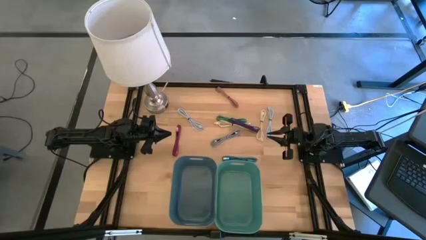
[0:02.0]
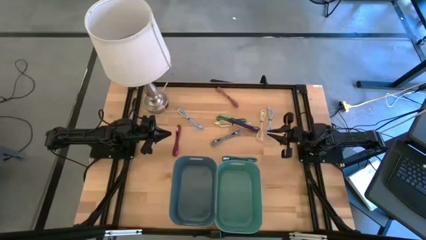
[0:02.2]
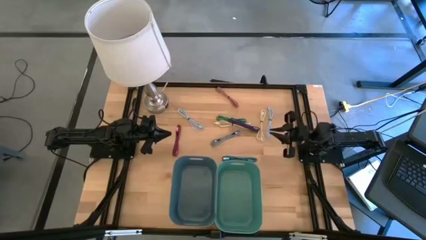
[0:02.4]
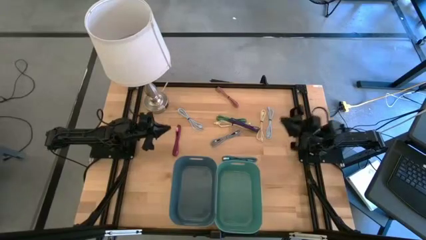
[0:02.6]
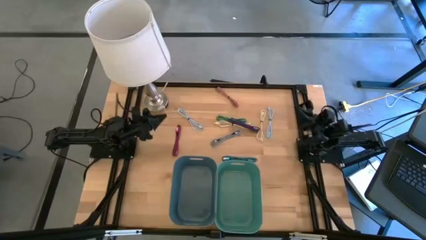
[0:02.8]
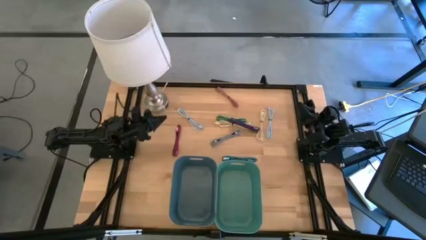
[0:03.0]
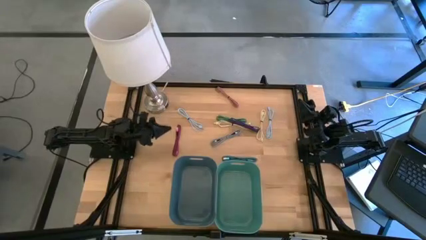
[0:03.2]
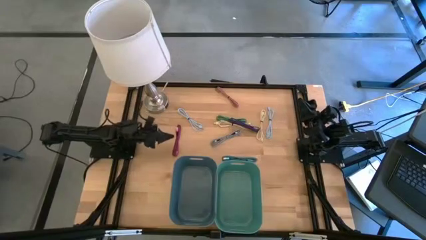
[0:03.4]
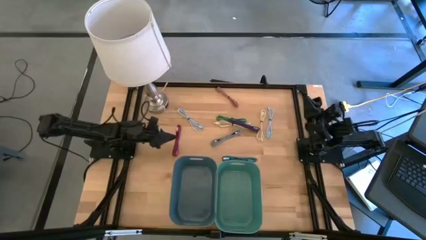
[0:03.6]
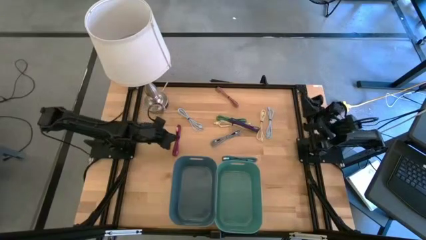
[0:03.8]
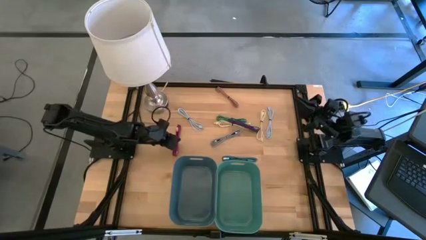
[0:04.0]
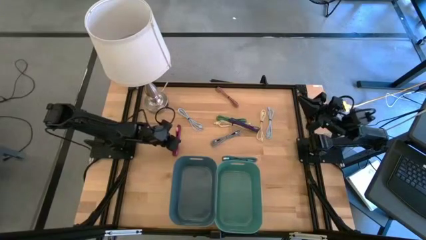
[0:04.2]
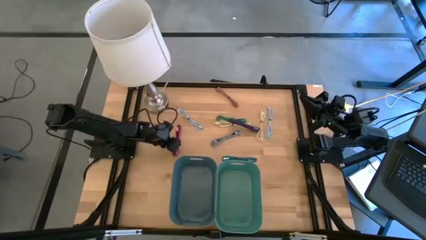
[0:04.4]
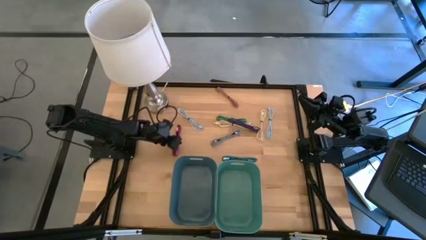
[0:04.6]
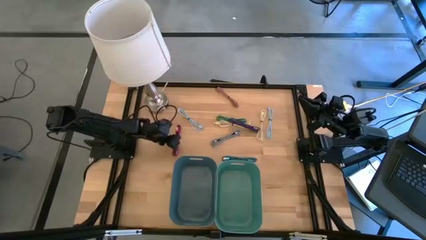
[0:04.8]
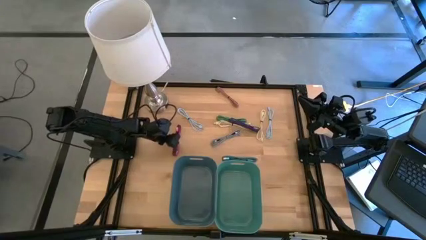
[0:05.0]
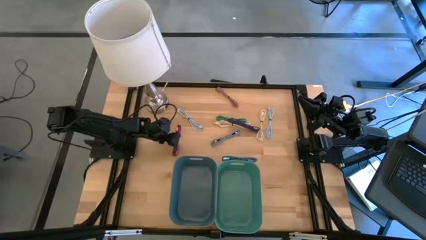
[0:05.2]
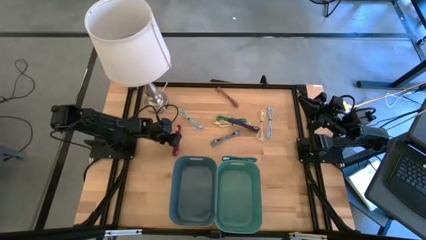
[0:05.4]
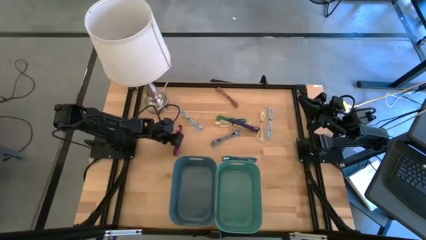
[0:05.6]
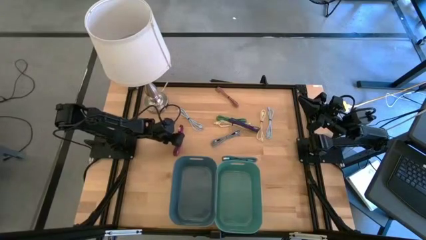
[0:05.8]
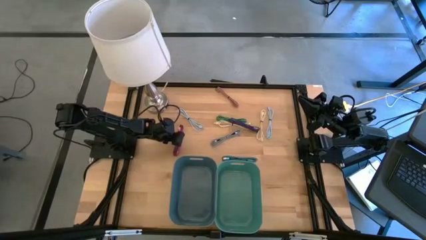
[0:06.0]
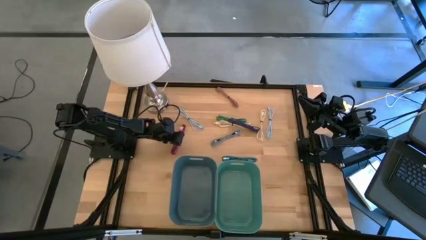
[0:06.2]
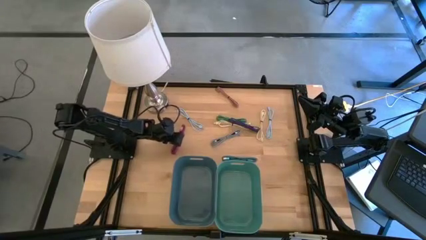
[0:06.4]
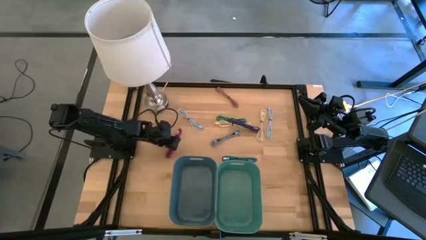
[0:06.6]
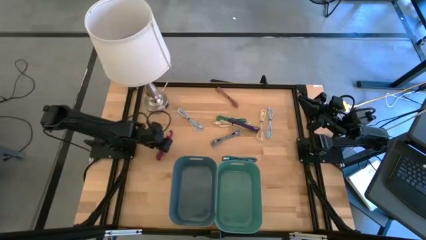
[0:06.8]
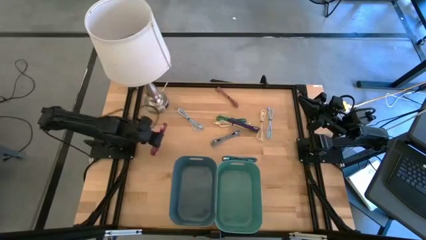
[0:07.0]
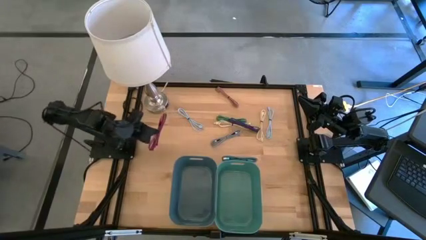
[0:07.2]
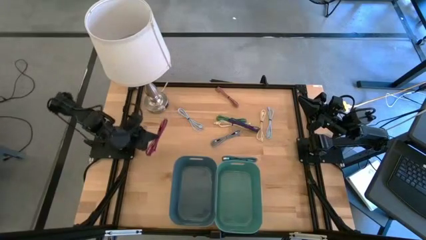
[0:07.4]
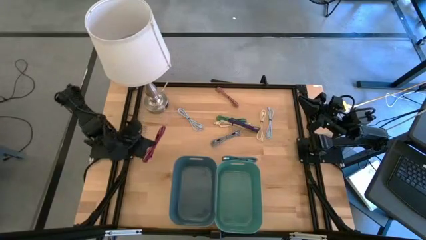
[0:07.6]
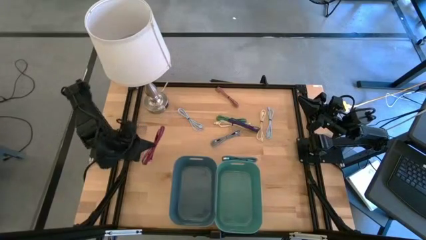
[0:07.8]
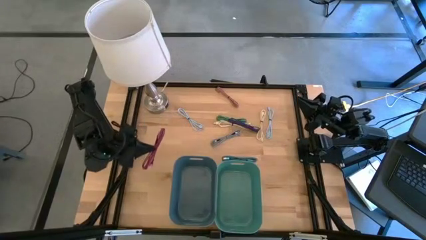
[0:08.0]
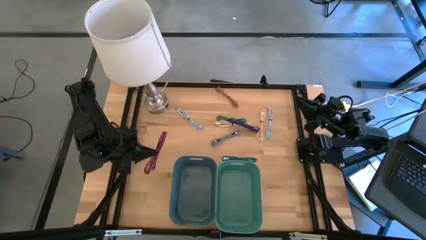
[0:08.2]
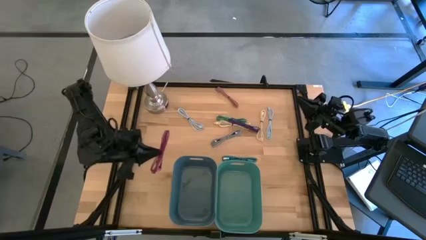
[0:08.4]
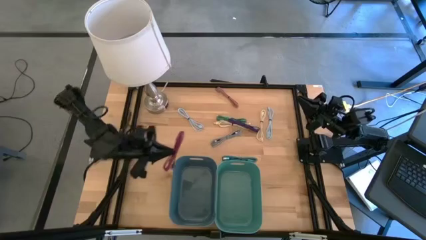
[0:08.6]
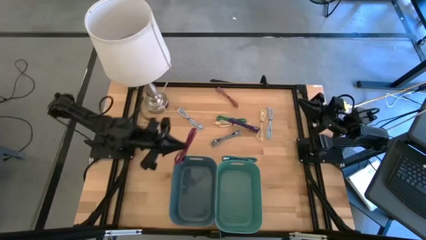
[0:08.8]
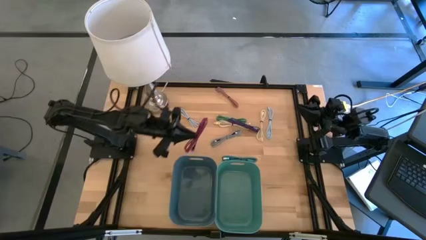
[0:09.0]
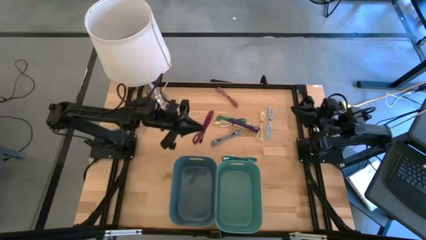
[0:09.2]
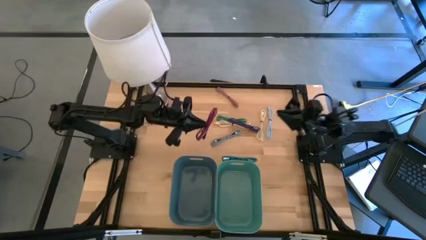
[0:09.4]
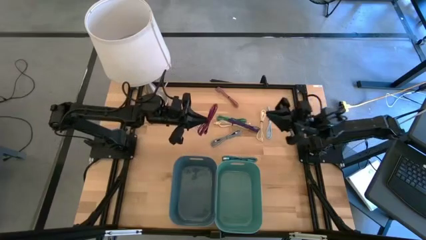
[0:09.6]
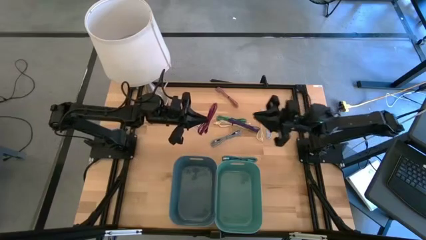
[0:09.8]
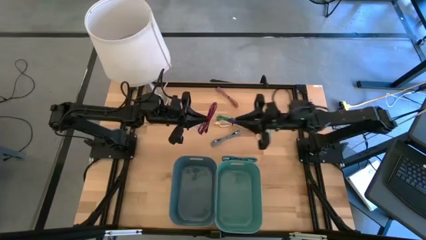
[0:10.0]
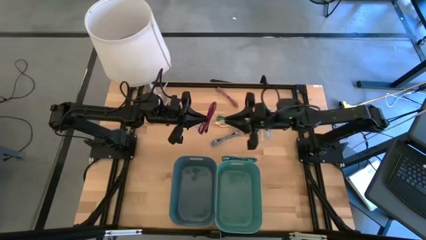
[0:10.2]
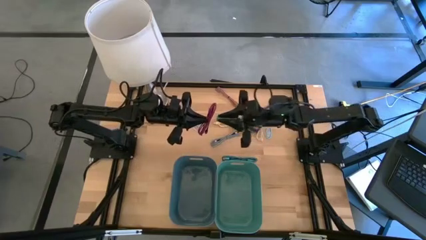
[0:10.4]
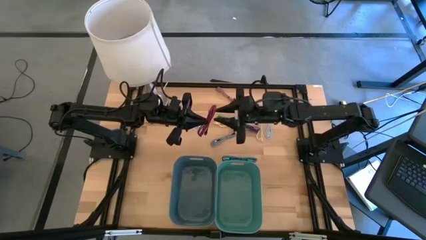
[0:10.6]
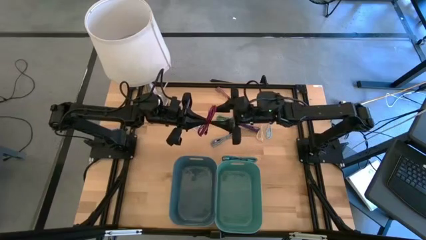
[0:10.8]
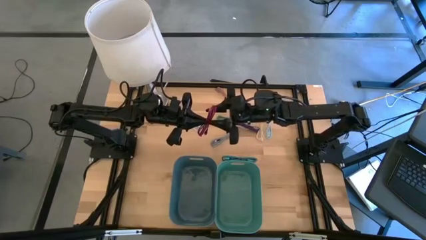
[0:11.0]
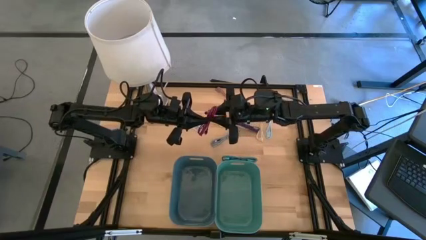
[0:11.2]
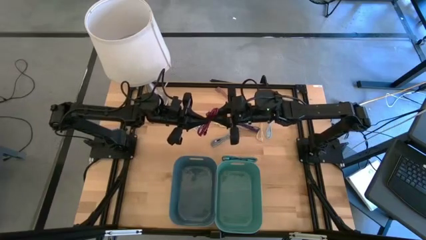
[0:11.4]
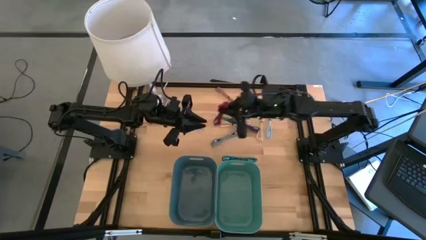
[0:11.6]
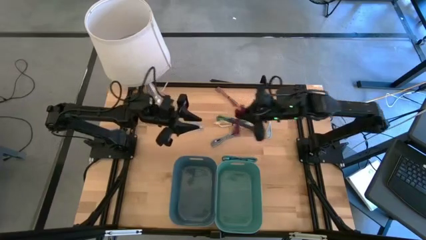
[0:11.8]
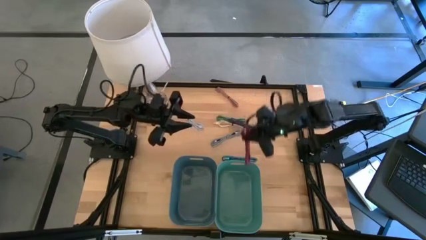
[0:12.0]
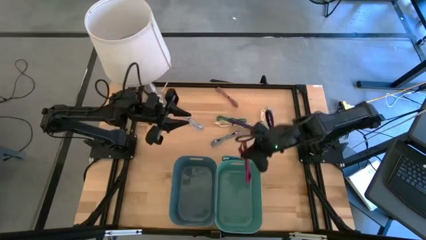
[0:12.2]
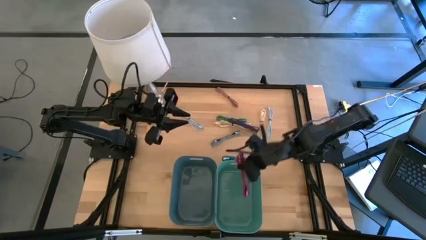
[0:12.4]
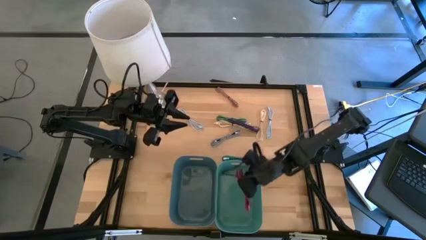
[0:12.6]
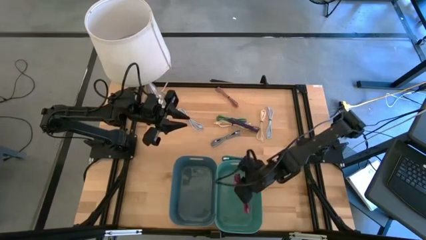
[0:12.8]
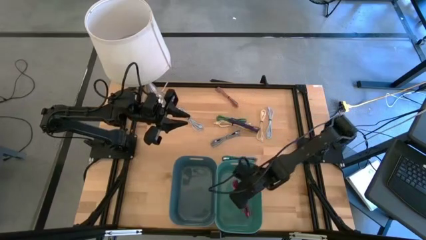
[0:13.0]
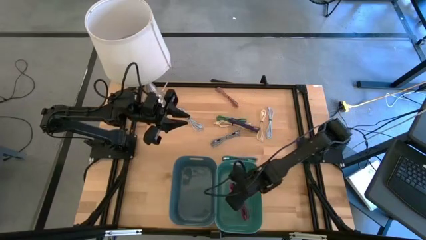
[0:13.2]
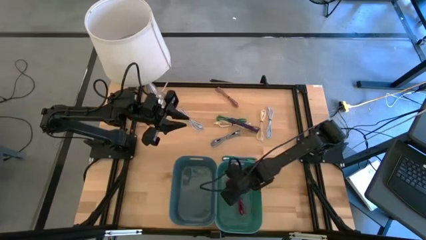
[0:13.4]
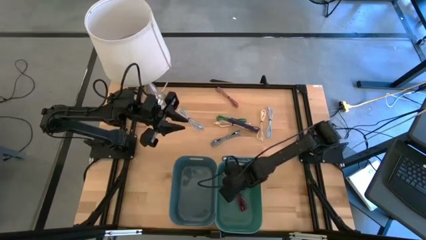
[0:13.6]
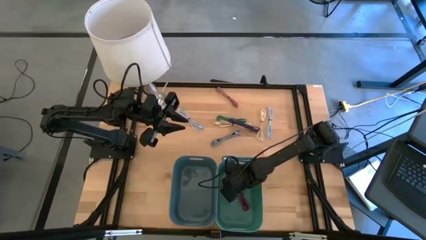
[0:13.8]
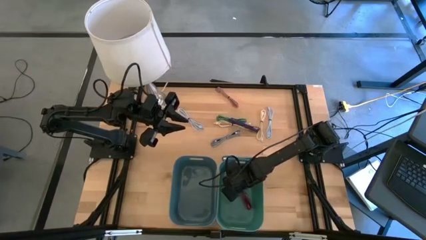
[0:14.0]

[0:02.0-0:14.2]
Put the black and red charger cable into the green container

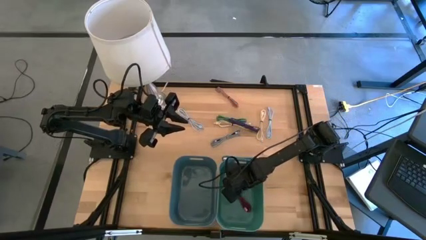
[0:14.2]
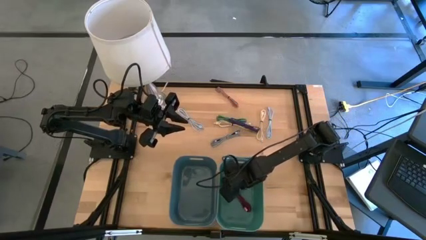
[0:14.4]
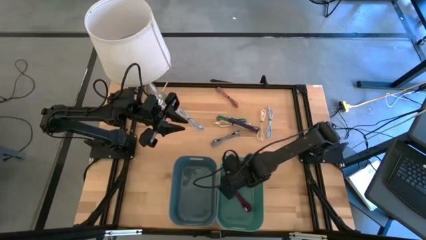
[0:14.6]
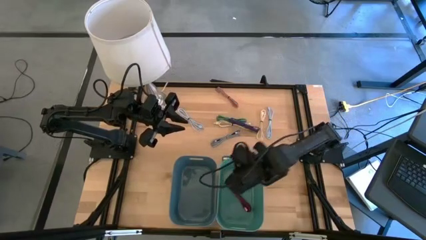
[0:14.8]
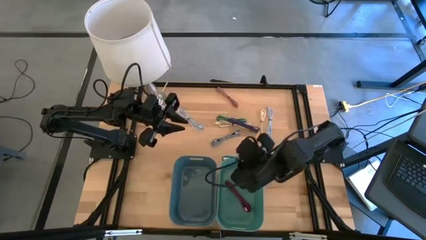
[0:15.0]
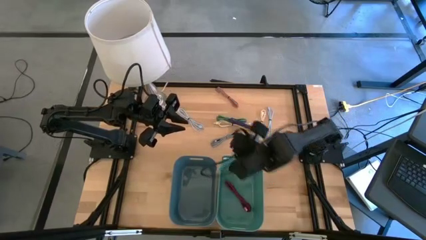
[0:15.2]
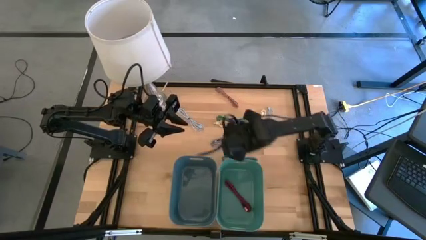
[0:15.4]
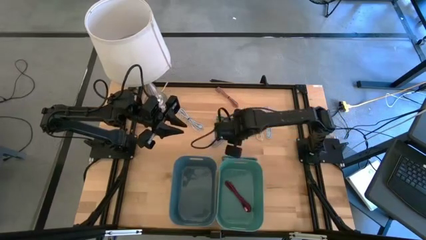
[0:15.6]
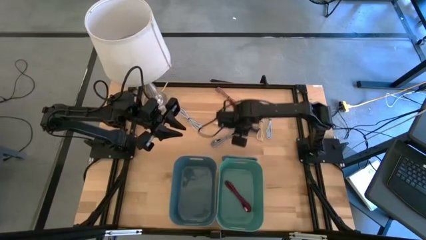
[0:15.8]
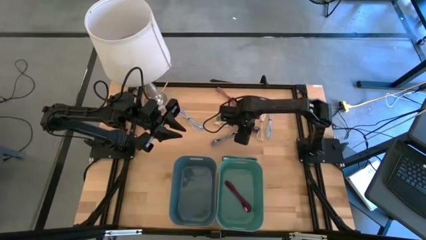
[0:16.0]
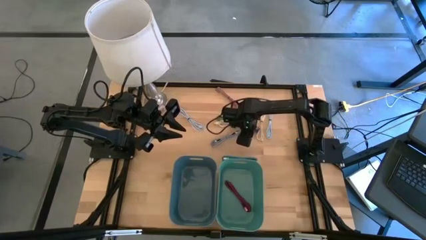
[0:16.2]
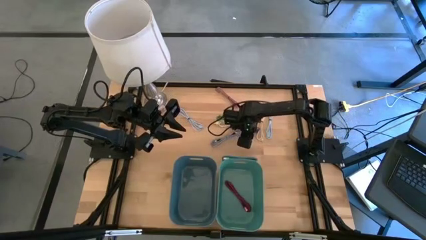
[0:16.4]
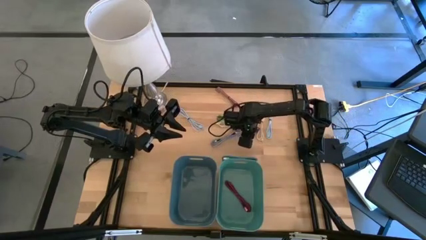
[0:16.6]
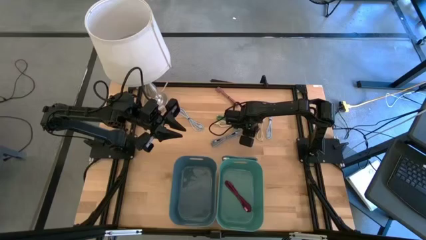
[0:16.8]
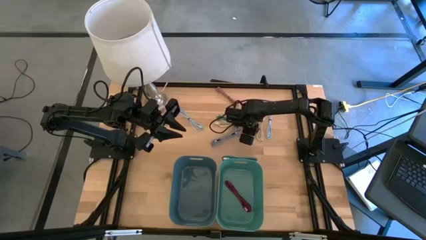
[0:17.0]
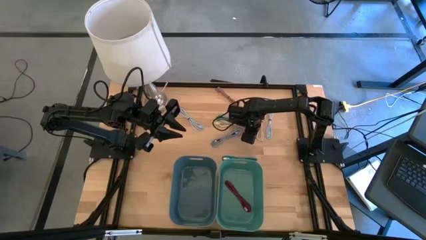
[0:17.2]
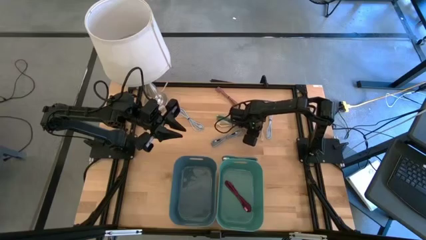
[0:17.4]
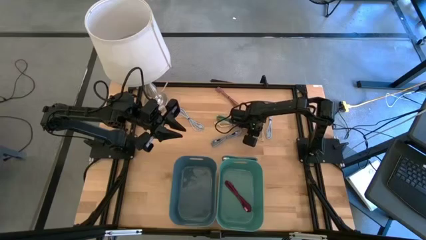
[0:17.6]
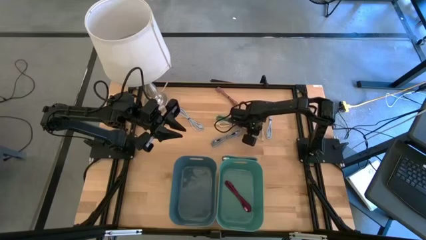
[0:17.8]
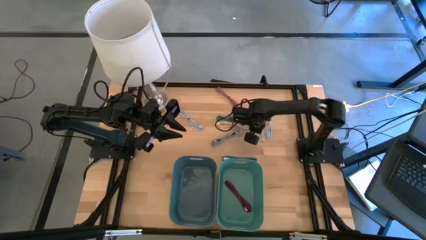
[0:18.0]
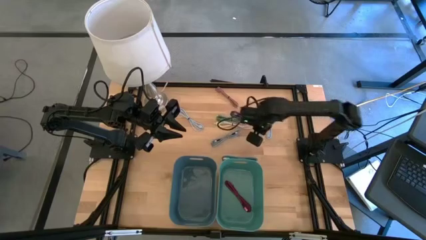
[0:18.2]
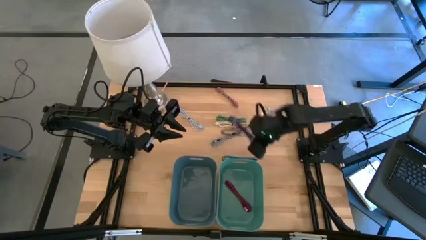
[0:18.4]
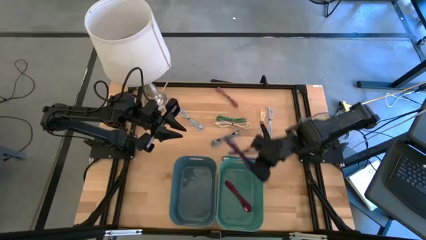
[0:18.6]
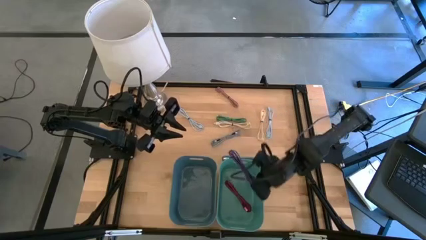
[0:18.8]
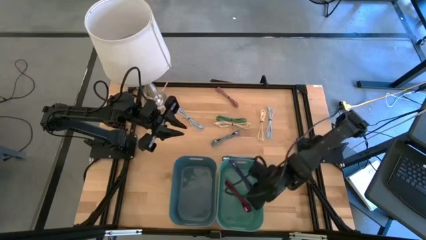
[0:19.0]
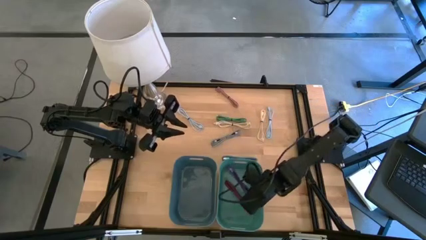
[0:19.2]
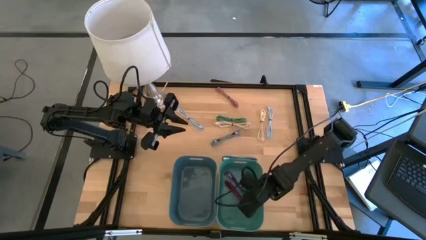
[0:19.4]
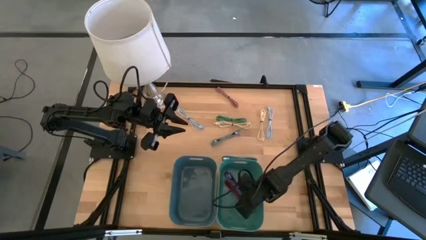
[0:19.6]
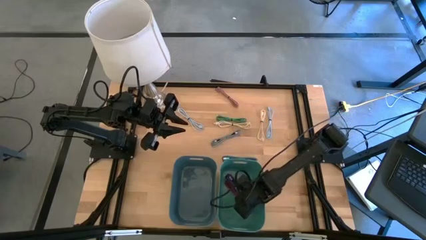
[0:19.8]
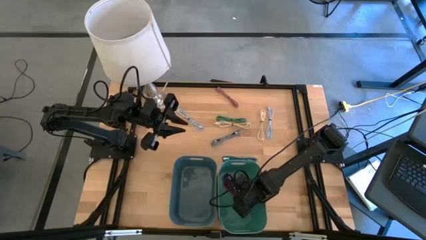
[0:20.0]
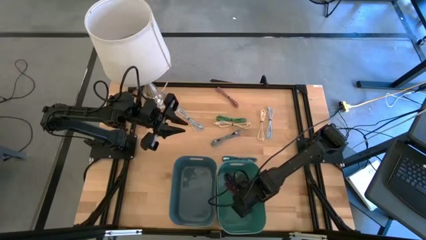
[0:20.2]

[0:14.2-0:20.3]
Put the black and violet charger cable into the green container
